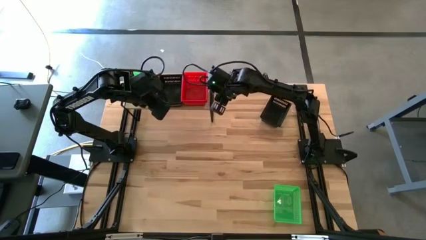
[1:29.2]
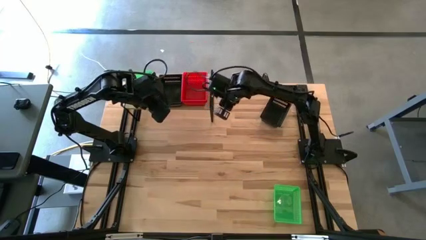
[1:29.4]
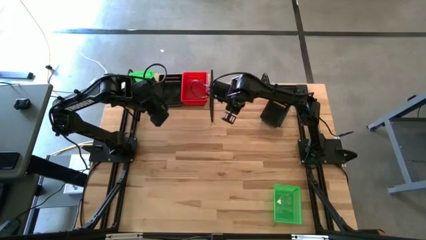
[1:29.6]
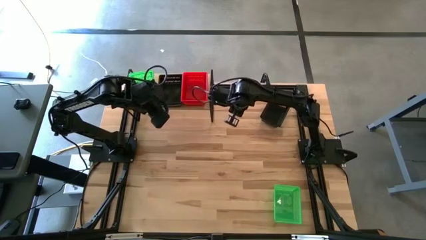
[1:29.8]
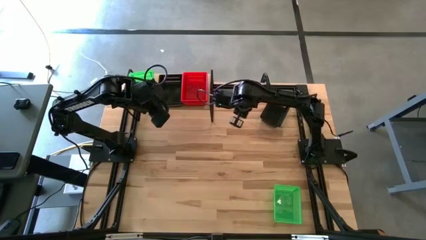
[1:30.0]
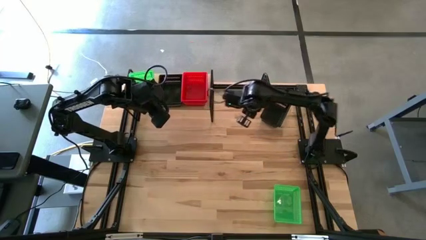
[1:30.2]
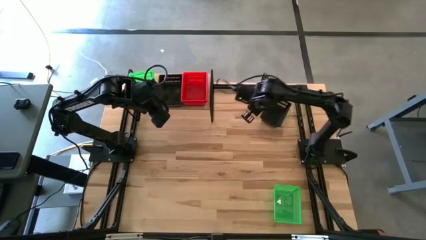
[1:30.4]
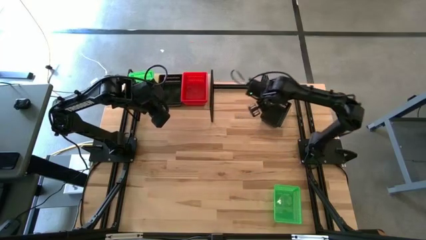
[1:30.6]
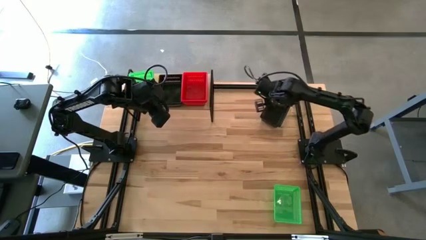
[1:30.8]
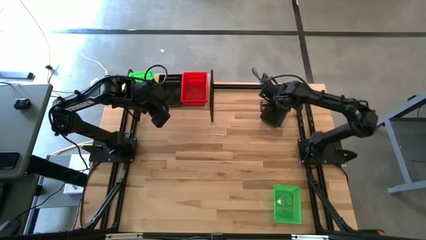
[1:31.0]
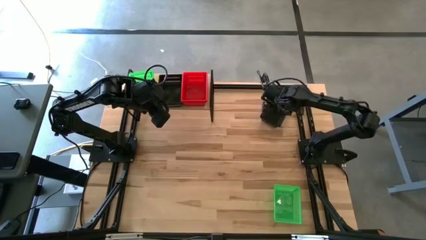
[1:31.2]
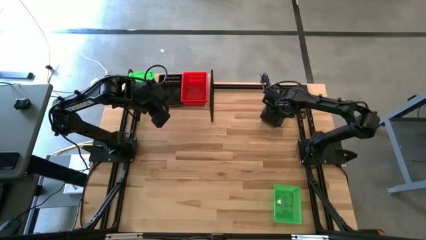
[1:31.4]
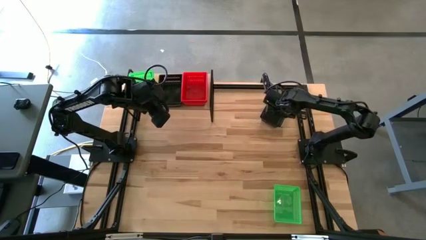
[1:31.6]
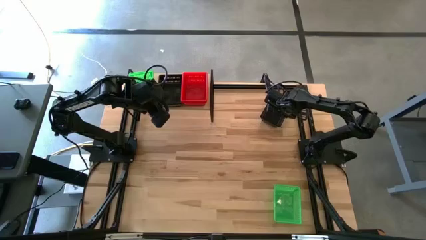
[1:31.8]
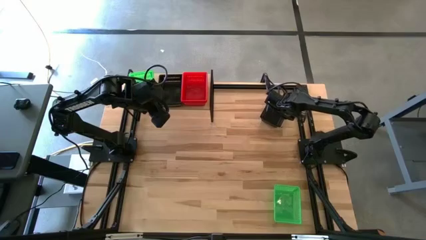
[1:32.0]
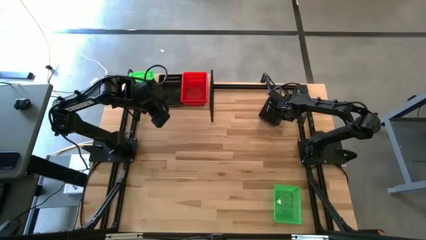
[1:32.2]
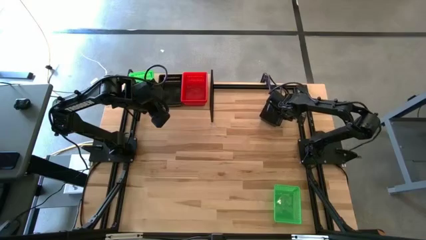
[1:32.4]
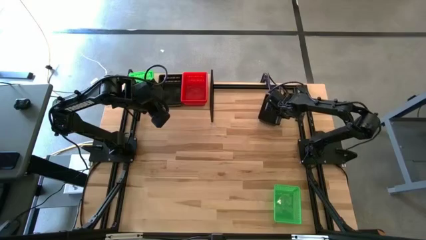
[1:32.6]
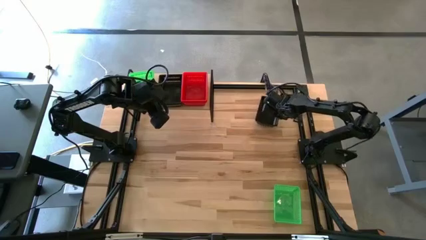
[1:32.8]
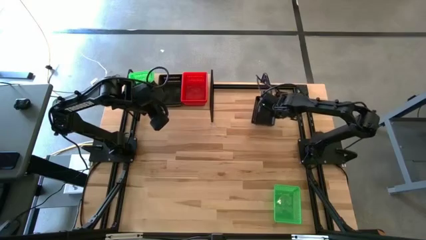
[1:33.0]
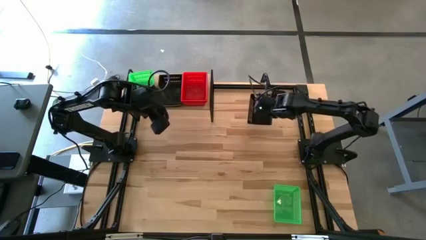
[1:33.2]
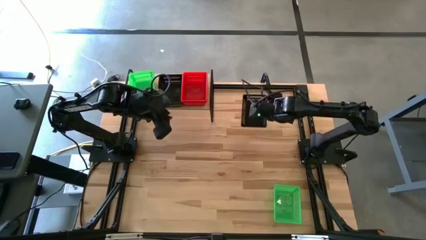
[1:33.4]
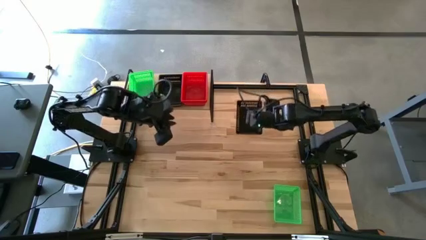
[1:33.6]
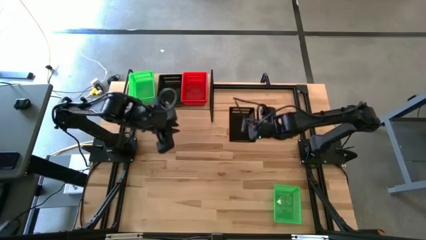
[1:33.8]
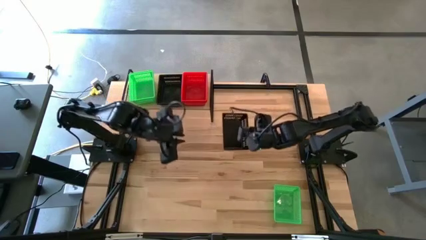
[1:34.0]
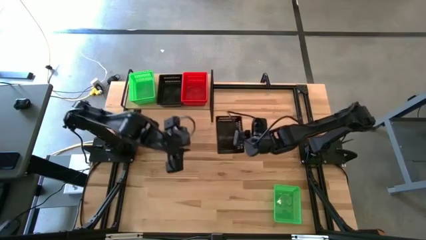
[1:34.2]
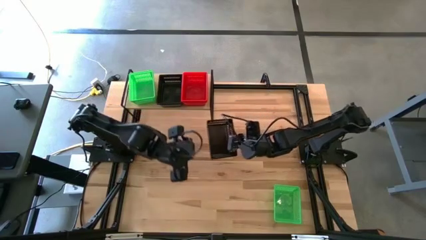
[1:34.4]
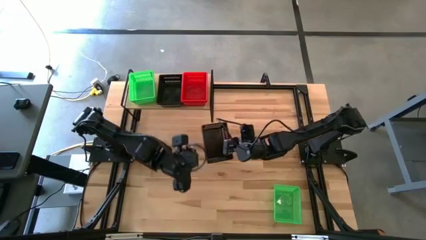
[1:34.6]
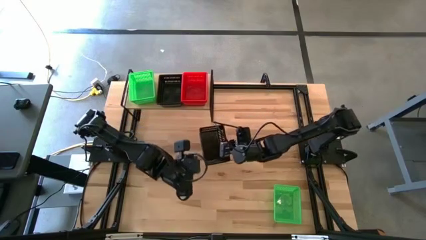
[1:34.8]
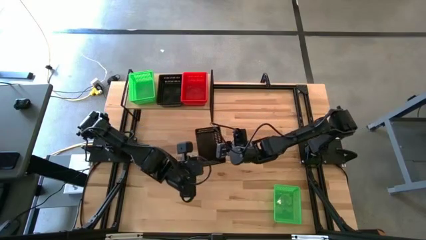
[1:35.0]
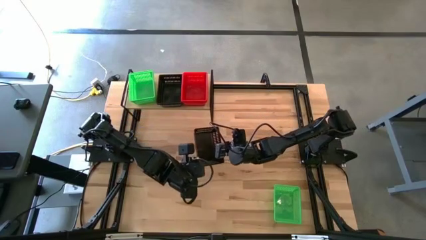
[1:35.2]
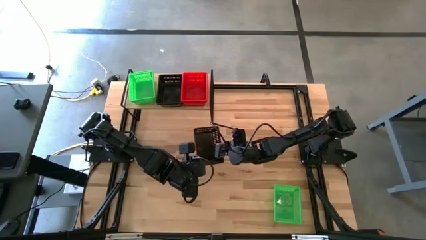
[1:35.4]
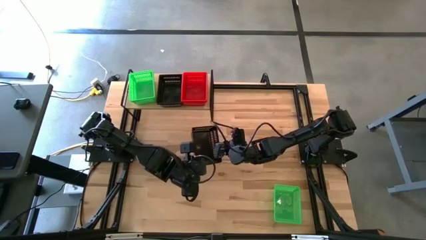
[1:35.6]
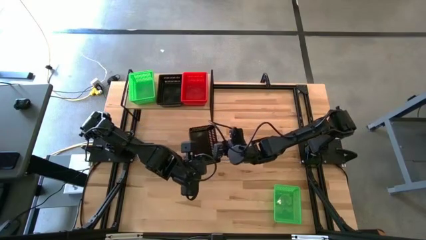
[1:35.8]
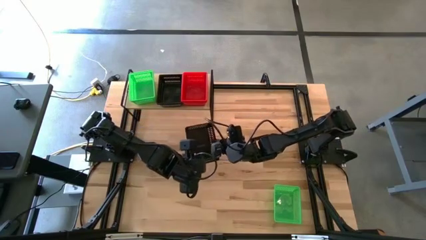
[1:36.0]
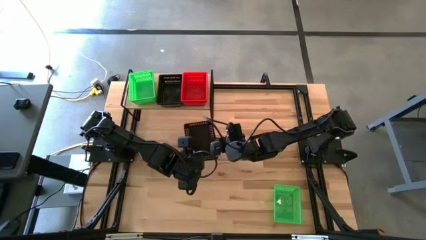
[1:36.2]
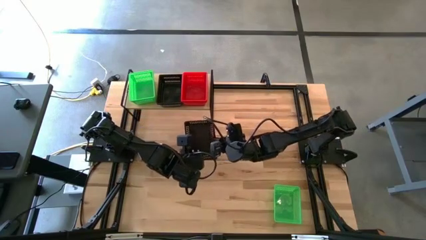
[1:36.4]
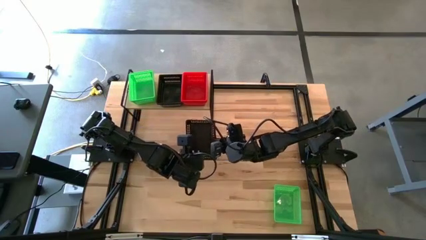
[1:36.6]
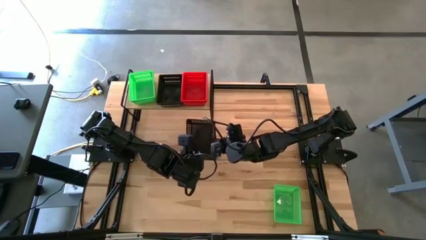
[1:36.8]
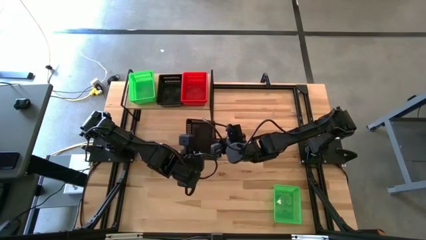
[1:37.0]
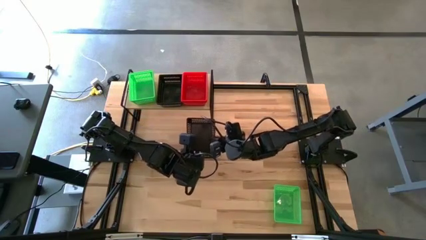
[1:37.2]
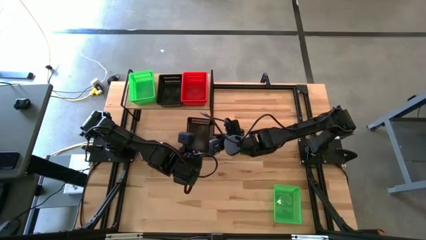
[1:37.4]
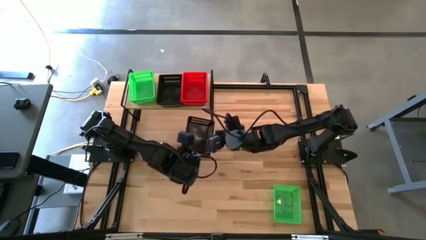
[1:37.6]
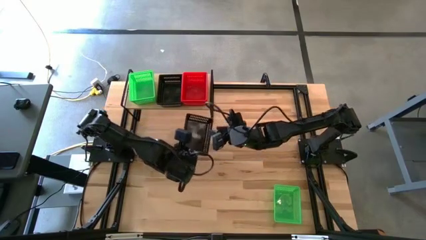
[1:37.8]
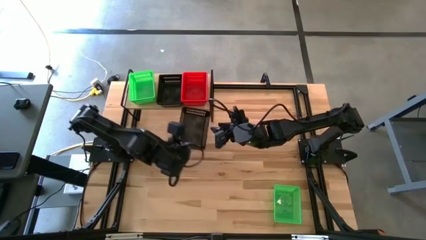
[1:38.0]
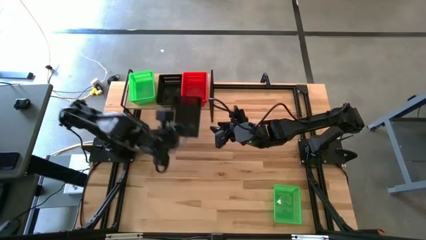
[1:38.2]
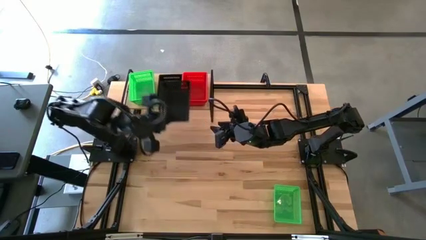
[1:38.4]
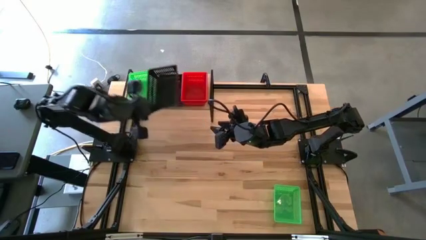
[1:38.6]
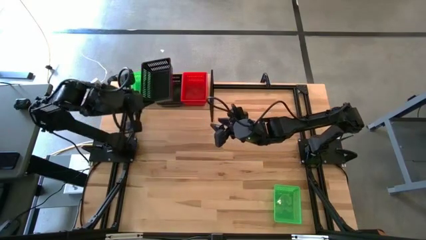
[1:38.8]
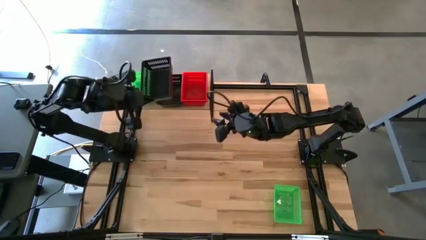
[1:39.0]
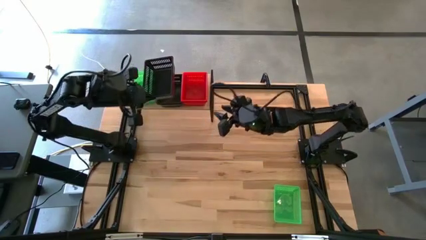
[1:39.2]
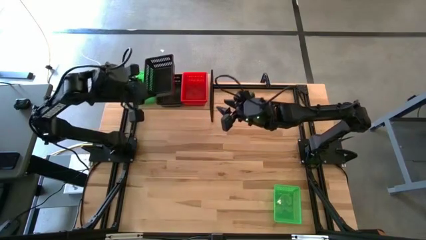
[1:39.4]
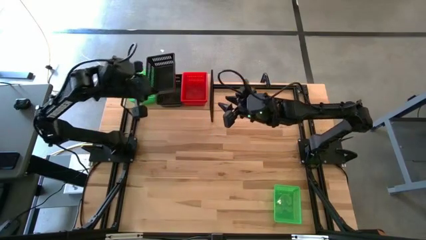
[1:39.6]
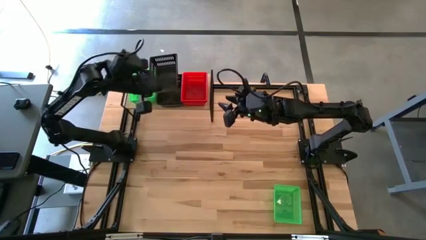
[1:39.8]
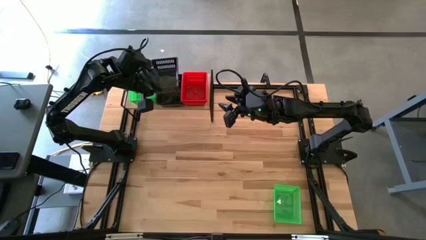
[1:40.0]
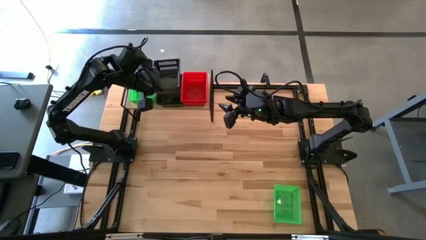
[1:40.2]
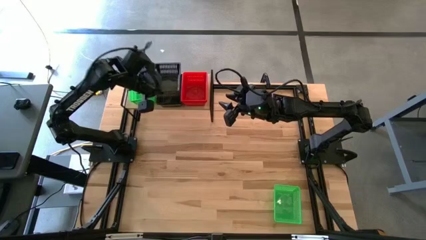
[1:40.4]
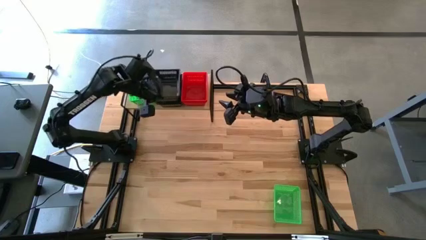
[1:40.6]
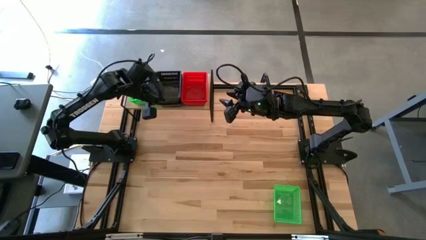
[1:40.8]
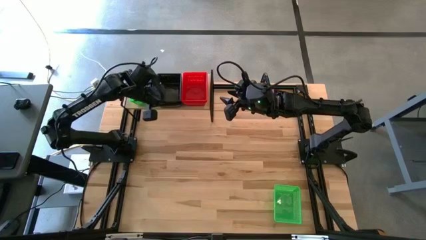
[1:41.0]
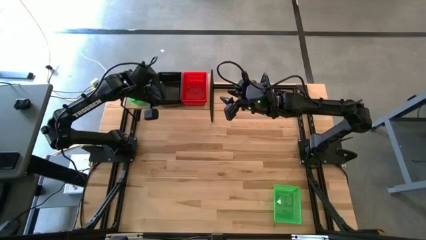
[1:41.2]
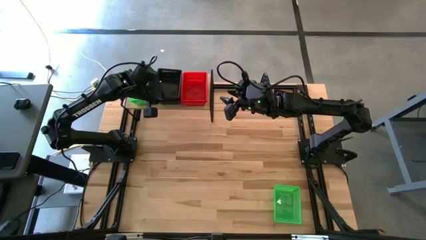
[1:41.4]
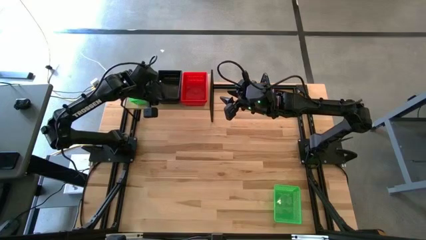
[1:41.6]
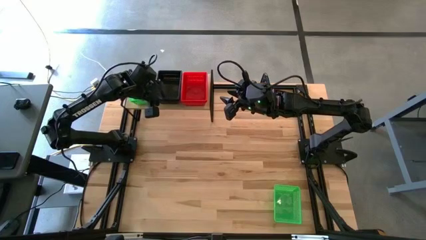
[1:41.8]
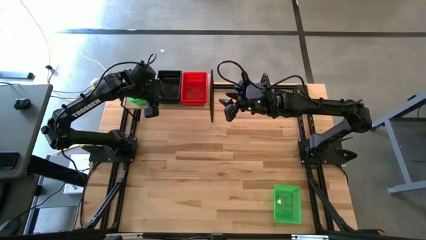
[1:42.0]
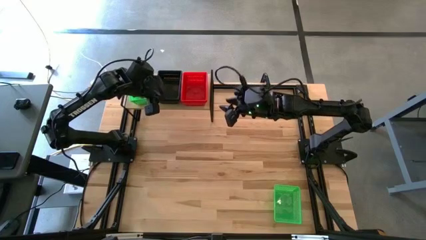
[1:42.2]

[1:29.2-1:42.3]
Task: Stack baskets on shelf by color
Stack the black bin on top of the black bin on the shelf

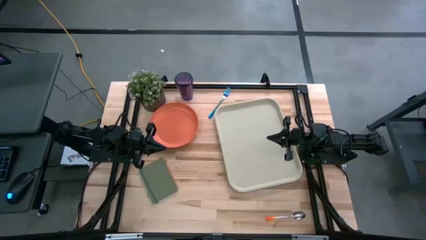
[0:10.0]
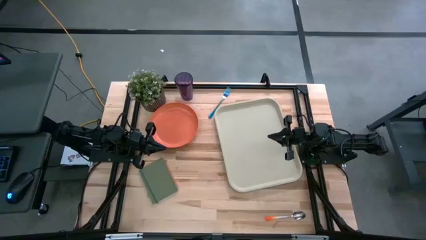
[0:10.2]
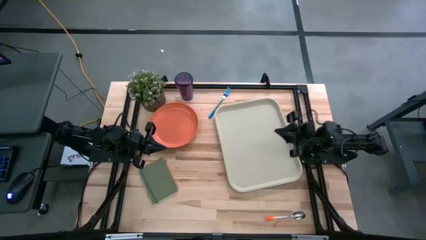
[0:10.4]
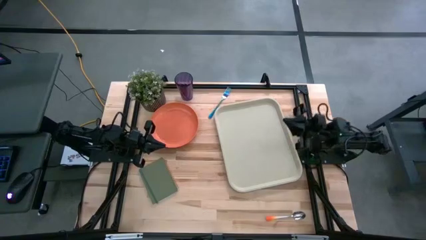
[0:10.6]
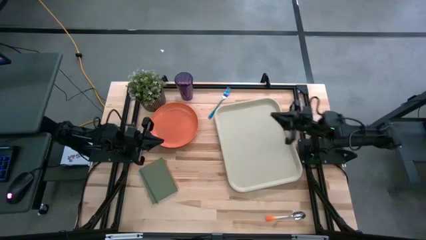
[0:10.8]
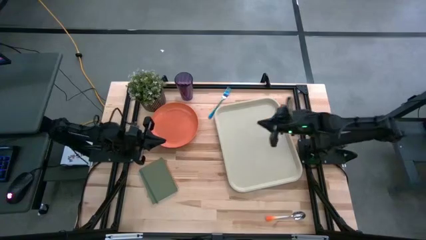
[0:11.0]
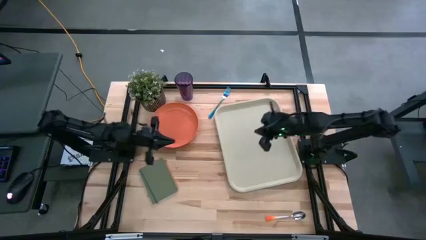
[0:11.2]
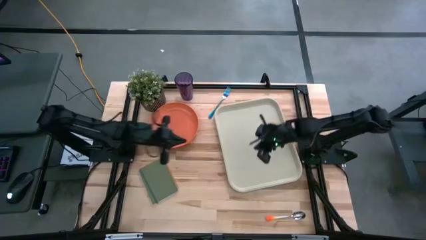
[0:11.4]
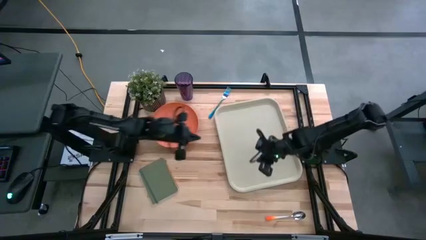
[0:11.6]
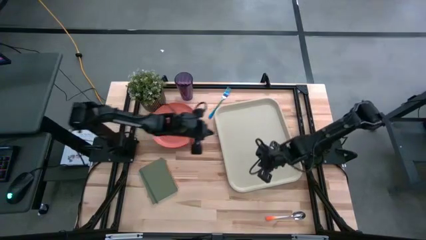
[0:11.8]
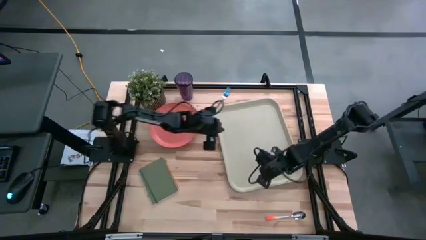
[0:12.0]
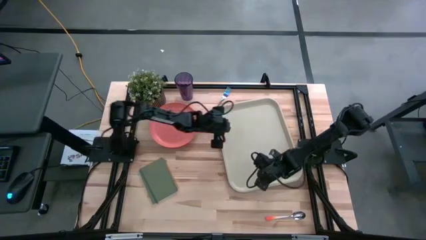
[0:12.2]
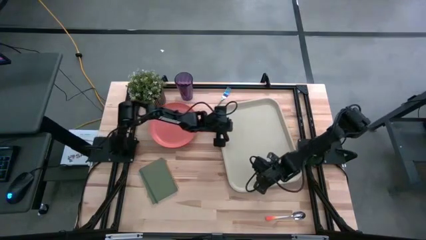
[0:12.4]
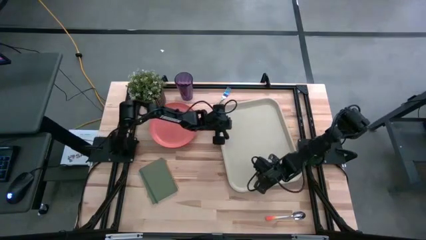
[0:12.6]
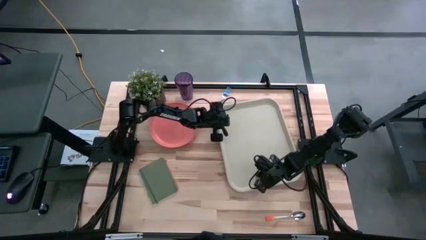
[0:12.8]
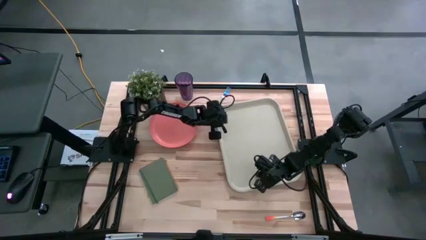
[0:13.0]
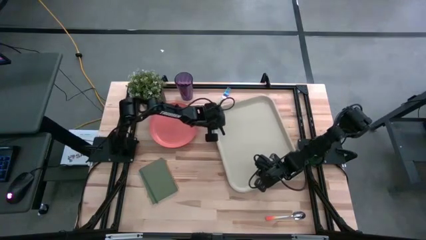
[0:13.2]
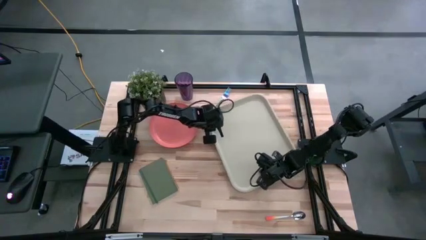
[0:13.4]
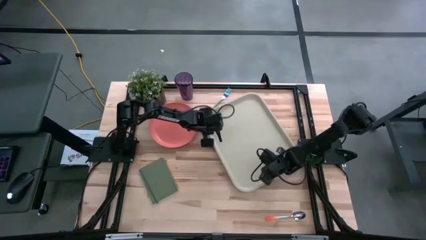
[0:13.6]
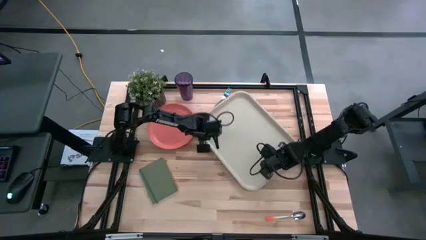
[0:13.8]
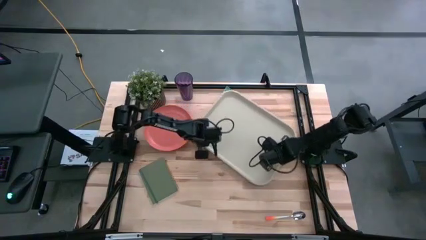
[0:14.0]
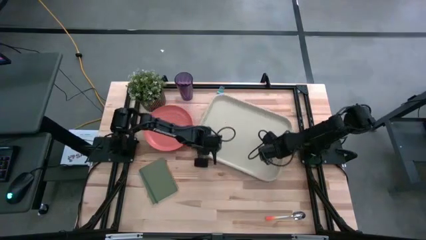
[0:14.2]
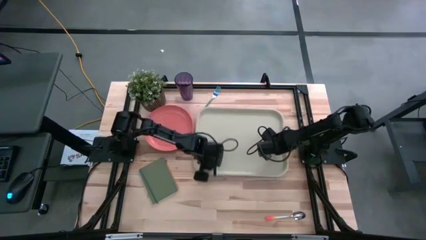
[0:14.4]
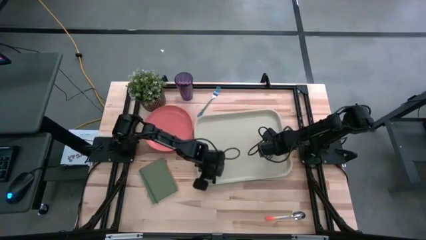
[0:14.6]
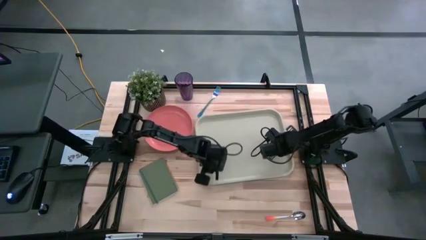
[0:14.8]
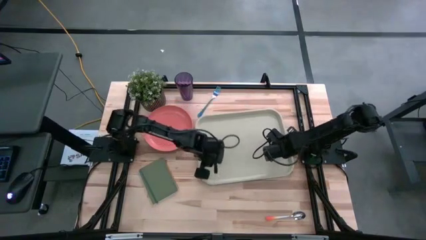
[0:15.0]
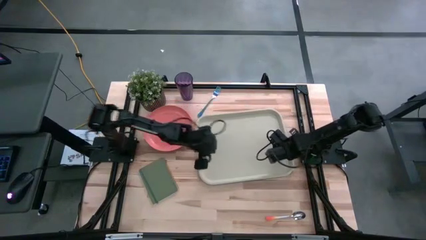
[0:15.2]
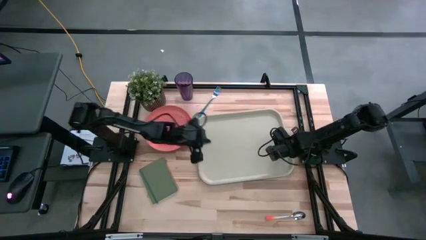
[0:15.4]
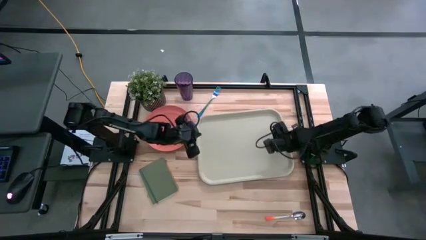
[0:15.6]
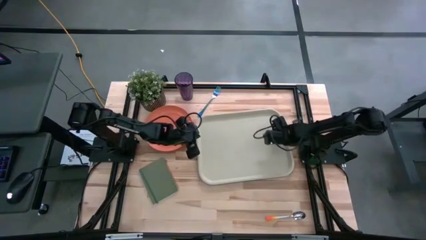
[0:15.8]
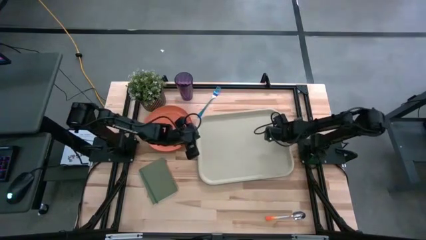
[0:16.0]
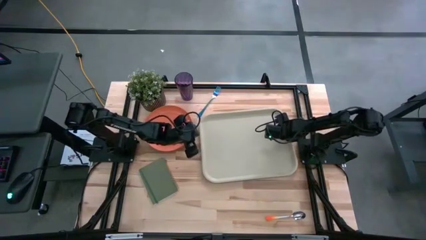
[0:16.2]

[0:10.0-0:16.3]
Task: Pick and place plate/cup/fork/spoon on tray
Prepare the gray serving tray on the table
